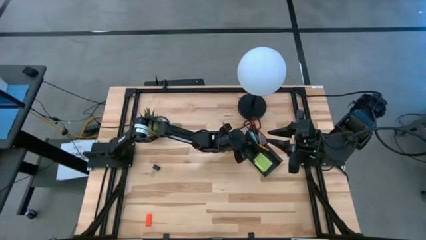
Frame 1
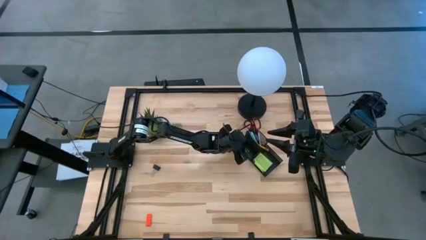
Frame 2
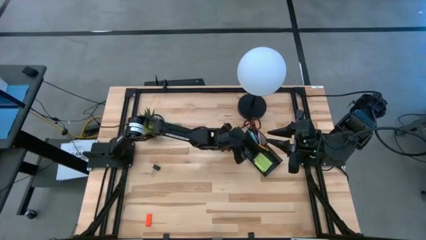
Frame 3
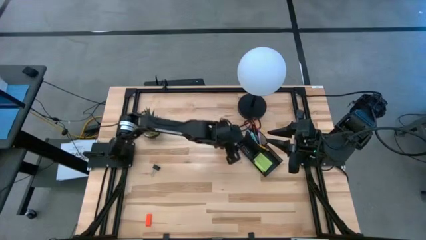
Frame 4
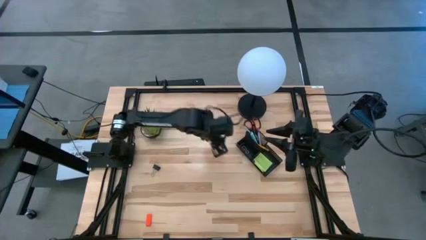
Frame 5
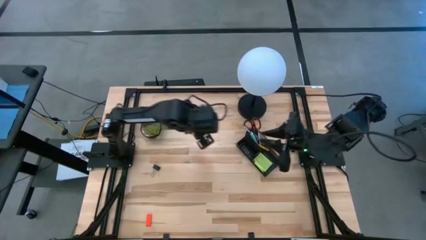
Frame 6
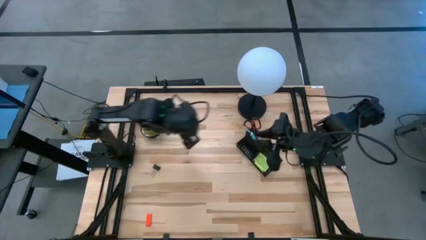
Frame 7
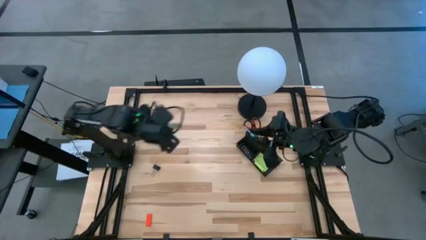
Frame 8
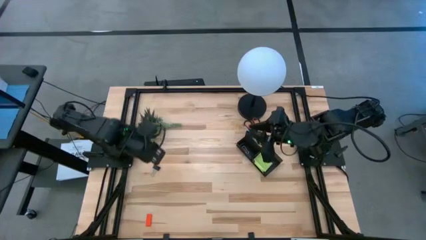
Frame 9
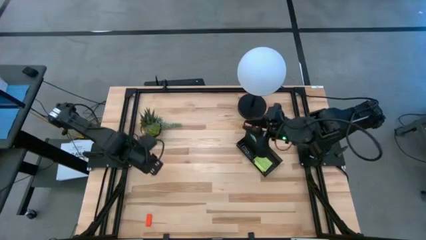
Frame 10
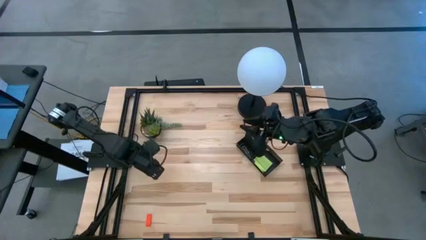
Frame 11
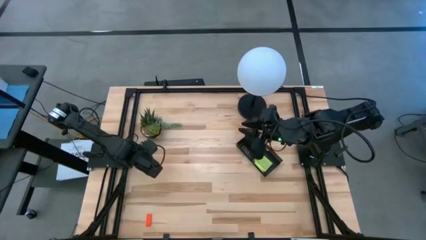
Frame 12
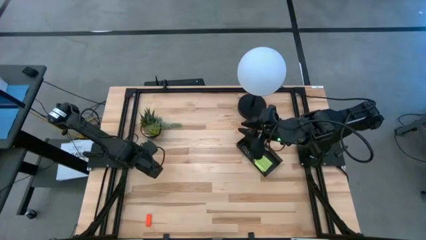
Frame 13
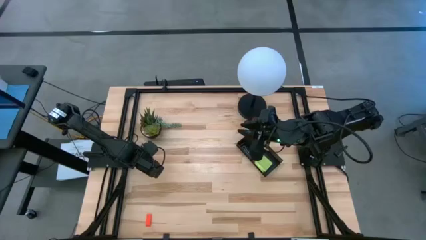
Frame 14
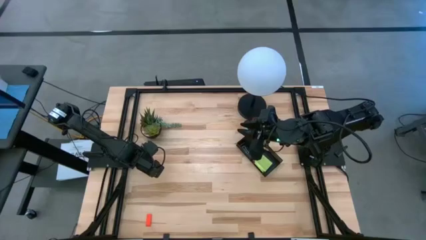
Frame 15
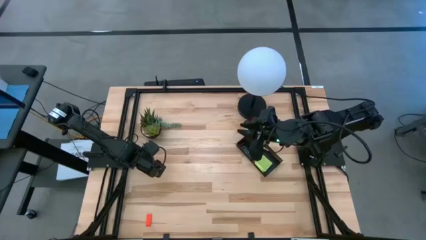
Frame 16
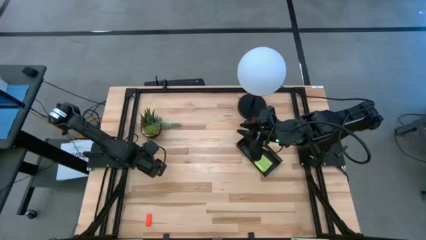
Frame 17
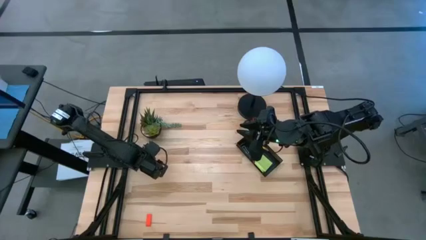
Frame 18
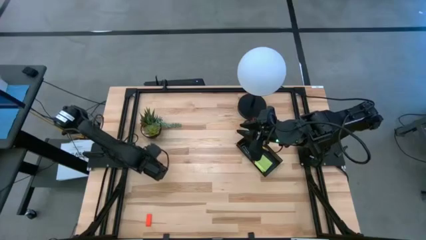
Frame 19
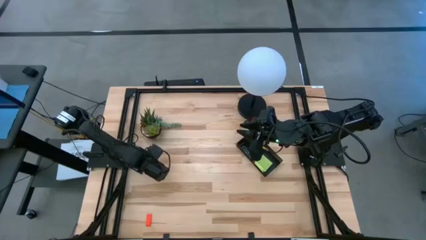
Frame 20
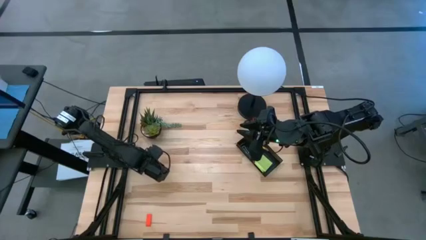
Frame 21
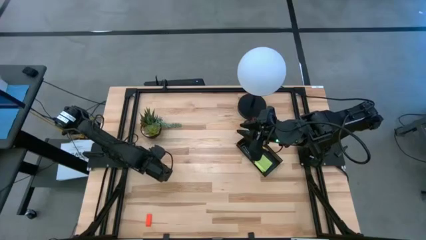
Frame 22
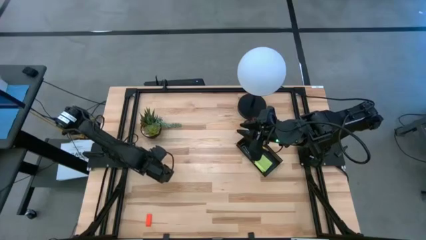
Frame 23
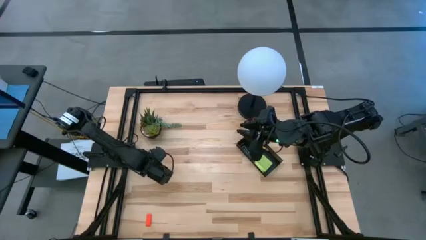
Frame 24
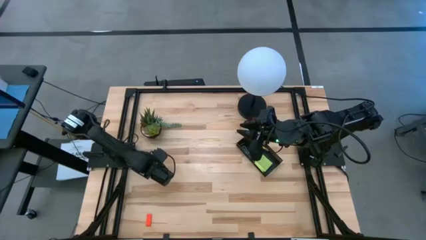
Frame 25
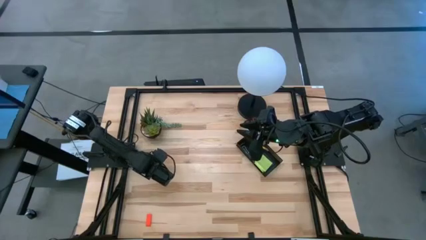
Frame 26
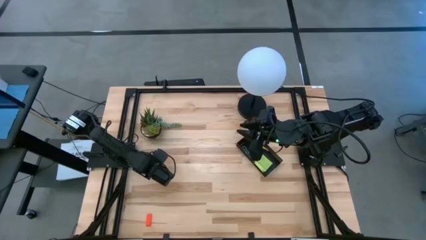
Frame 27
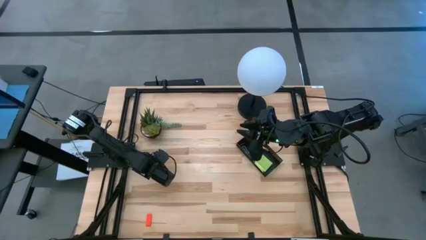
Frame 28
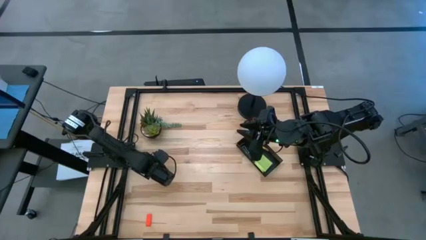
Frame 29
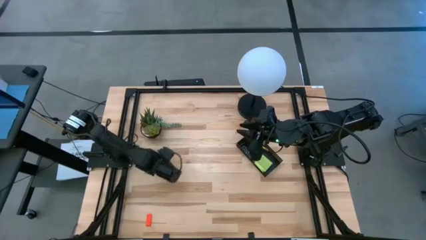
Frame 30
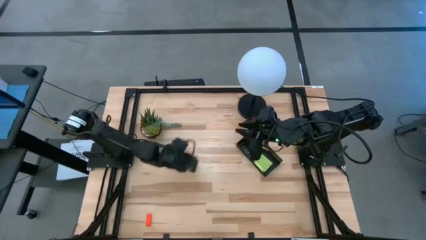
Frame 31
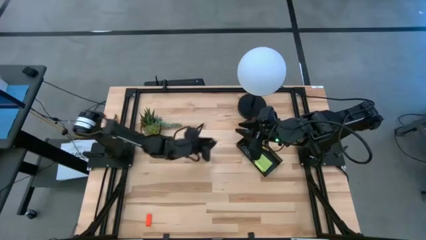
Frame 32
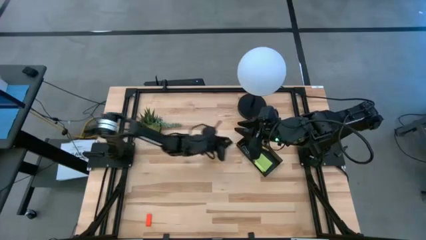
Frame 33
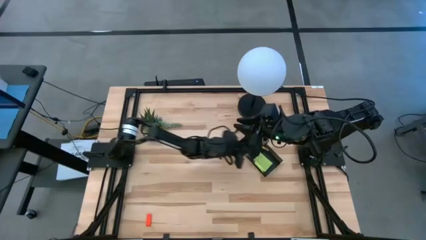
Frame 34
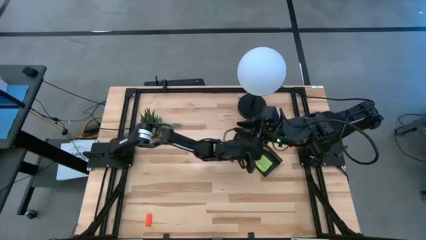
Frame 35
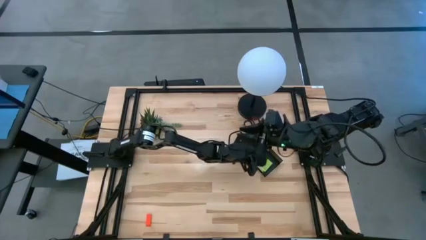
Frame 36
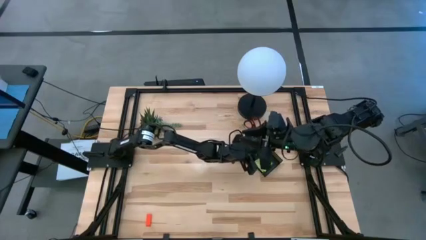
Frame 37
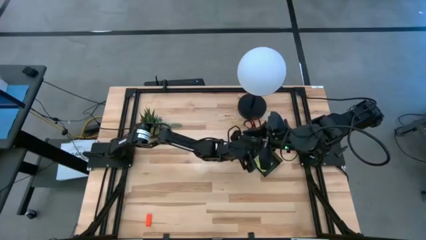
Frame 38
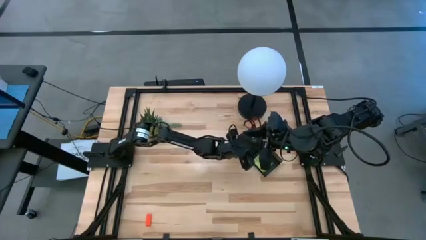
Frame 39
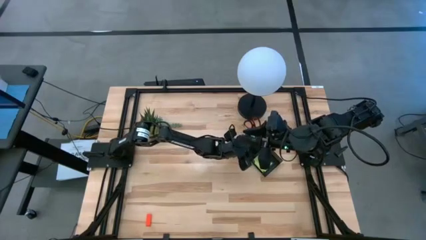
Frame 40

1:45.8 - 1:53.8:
Task: Pick and place office supplies into organizer
Put the black binder clip into the black desk organizer

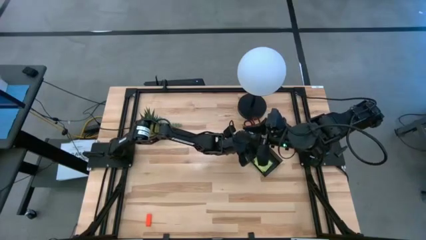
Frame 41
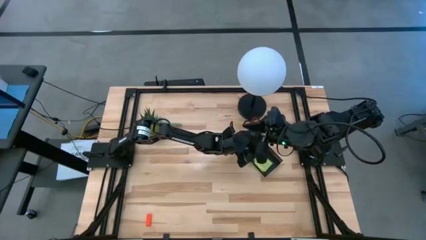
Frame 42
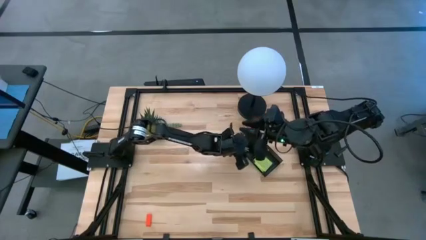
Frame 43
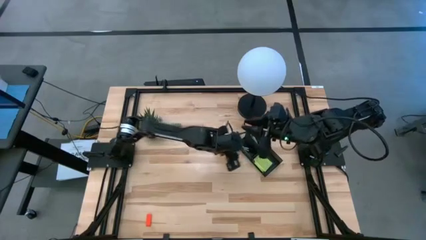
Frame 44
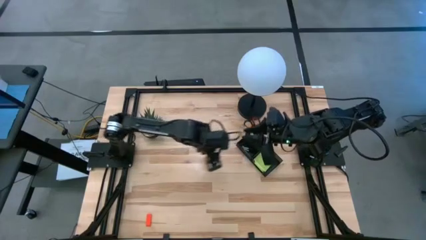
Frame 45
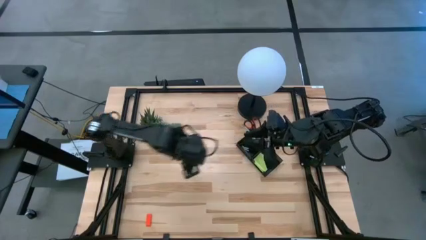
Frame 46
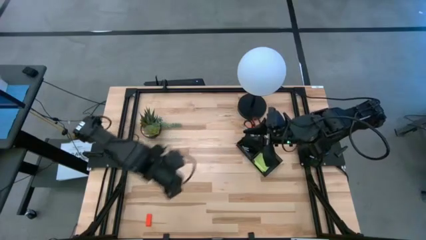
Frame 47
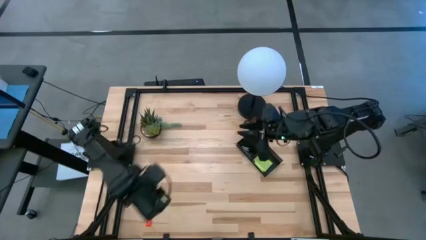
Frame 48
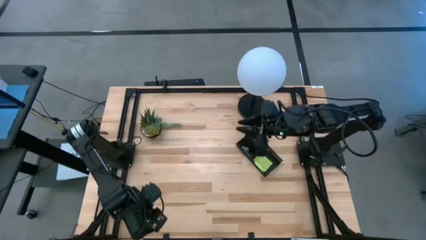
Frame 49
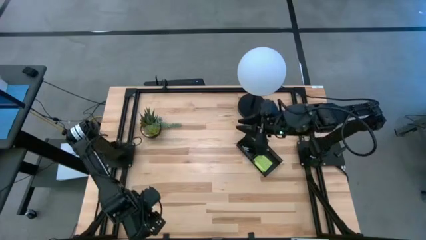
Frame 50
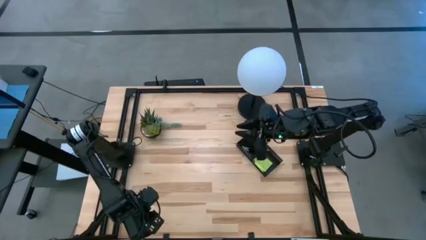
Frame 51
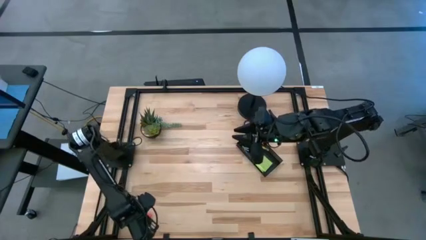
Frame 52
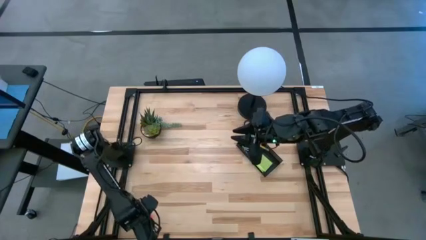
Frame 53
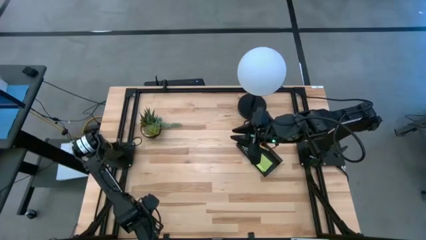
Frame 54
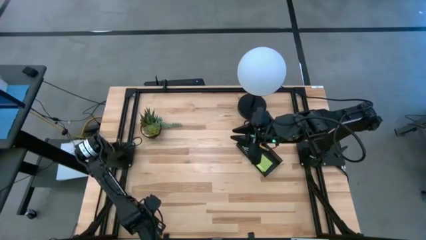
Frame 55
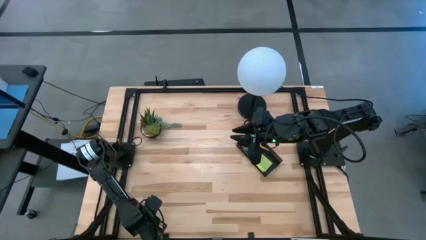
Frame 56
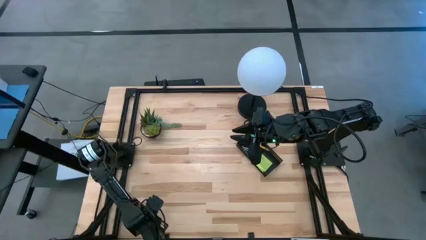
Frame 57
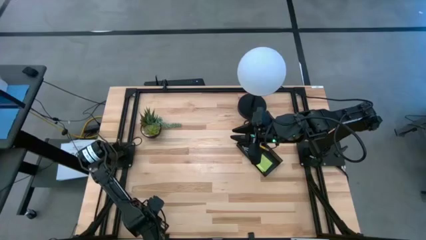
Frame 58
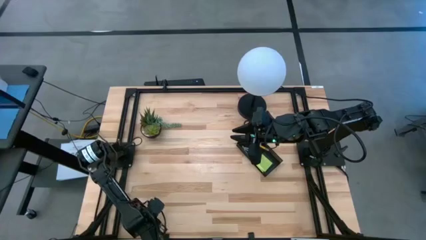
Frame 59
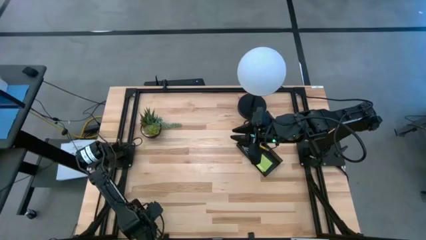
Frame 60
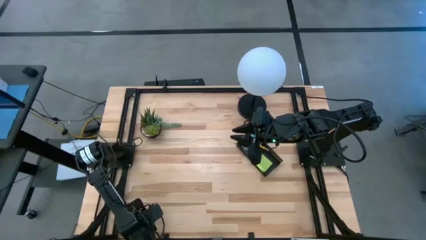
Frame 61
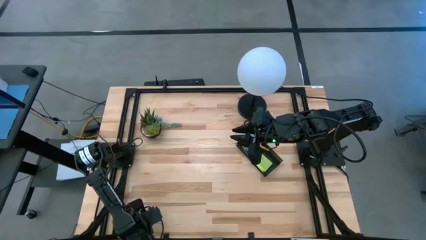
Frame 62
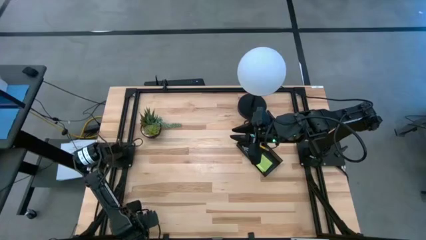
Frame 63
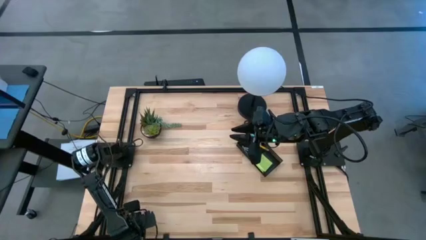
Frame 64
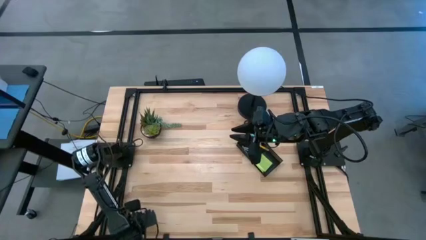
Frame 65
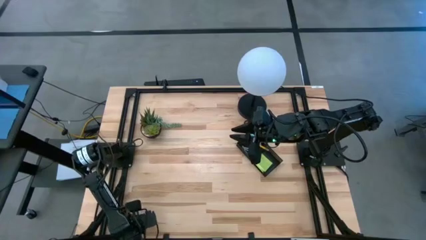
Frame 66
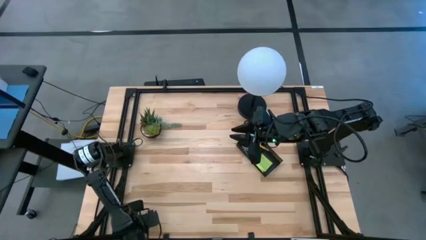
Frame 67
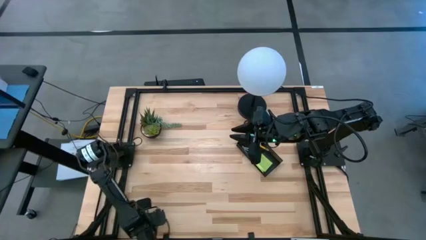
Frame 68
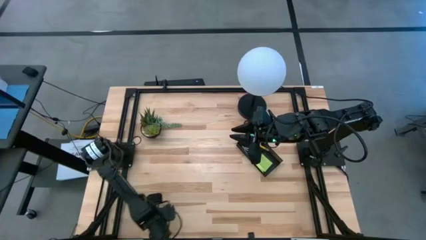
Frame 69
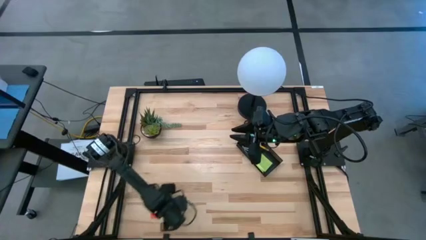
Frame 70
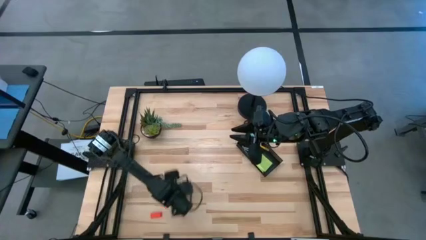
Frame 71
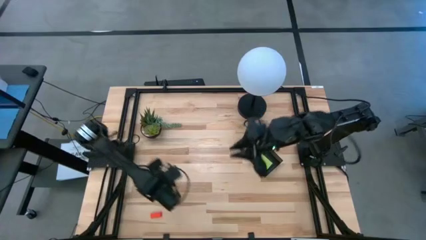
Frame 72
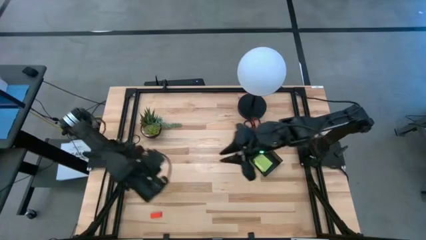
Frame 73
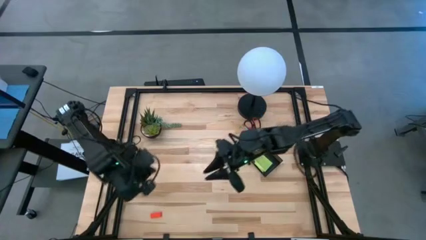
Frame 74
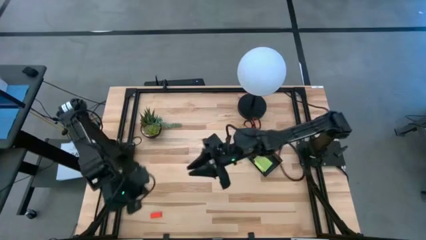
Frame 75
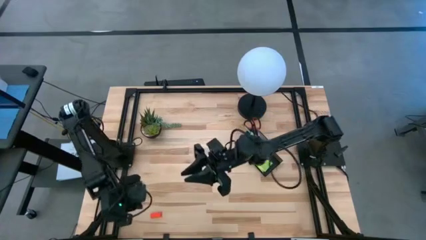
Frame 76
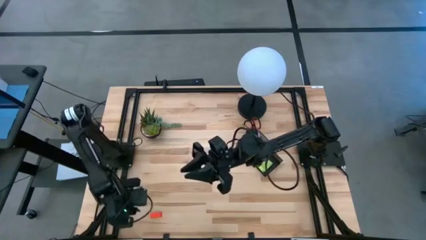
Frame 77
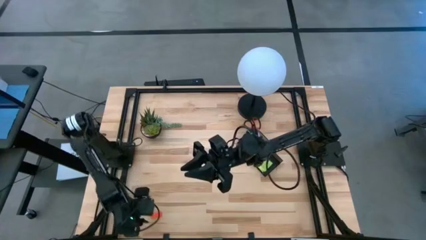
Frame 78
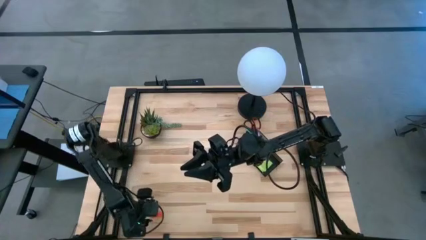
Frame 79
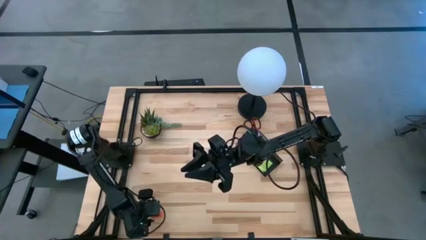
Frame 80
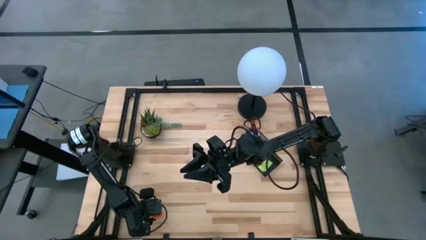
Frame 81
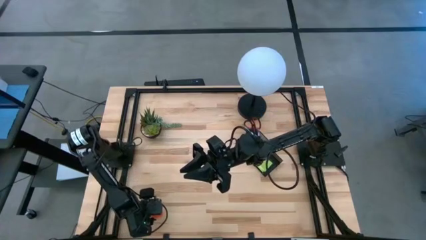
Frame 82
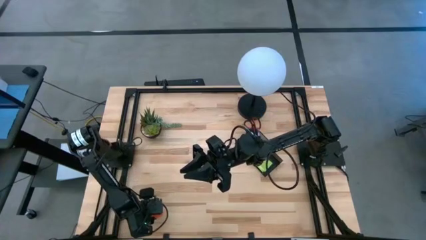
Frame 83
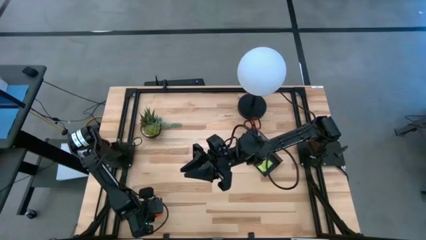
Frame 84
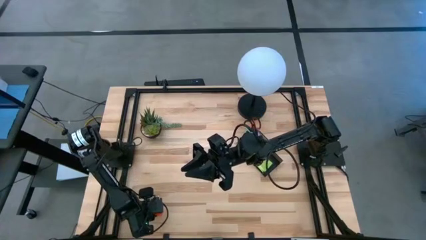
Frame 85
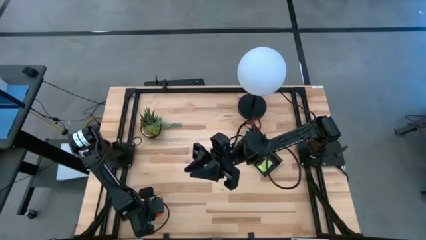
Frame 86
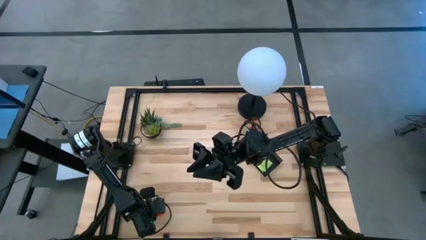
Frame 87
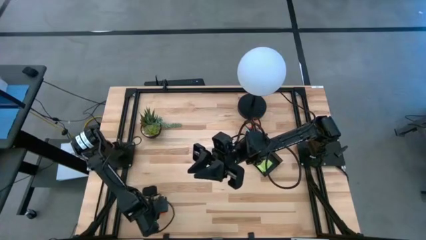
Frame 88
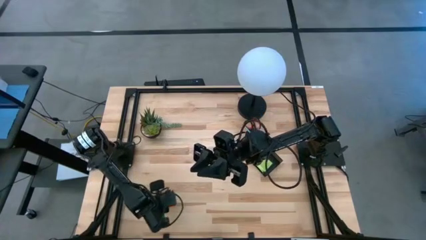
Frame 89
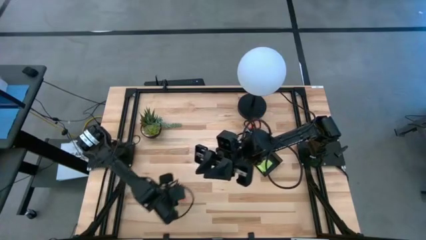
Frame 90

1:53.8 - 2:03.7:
Put the orange eraser into the black desk organizer
